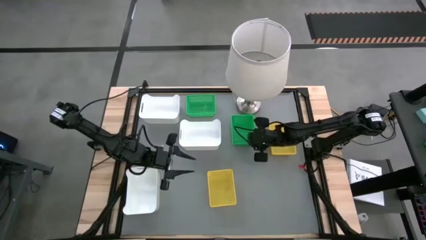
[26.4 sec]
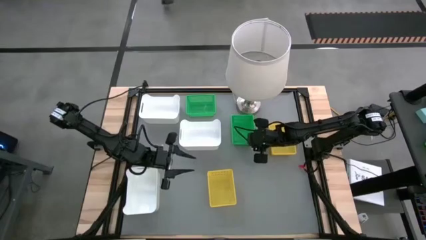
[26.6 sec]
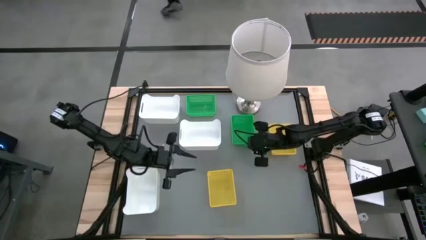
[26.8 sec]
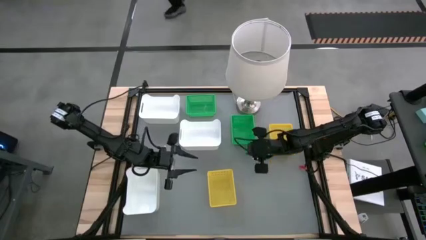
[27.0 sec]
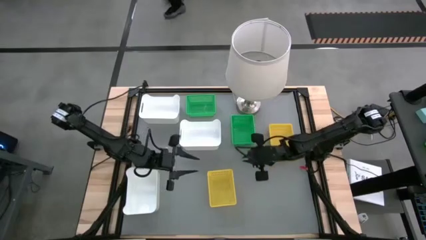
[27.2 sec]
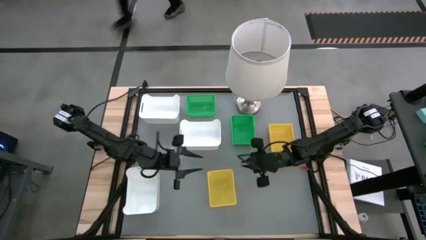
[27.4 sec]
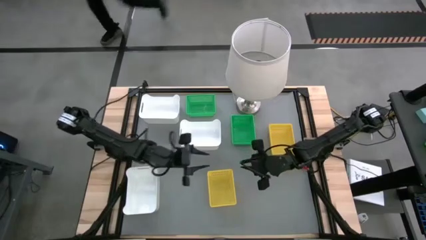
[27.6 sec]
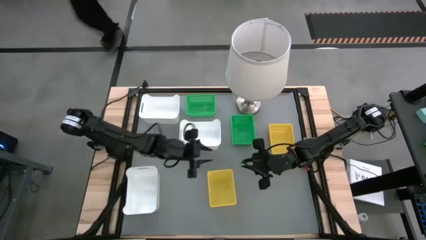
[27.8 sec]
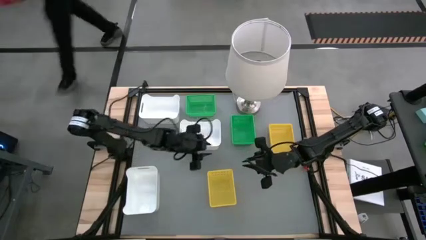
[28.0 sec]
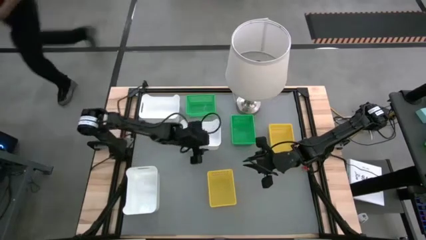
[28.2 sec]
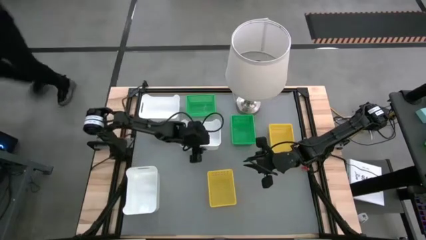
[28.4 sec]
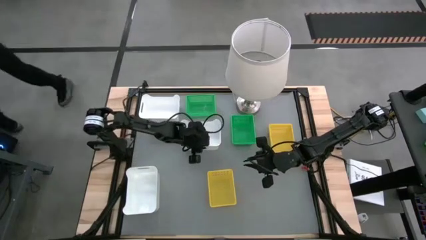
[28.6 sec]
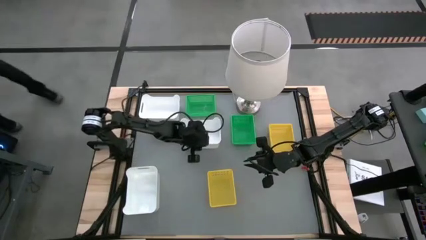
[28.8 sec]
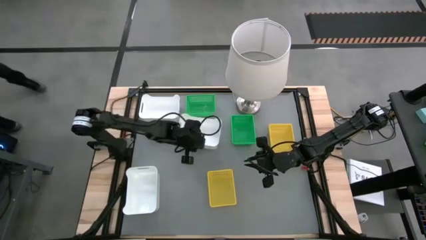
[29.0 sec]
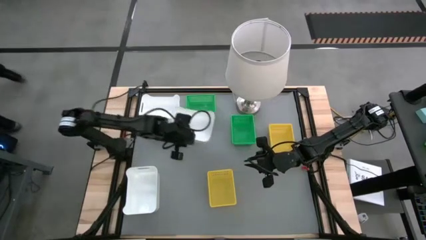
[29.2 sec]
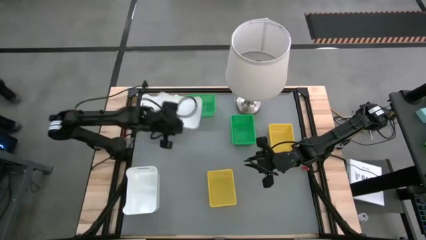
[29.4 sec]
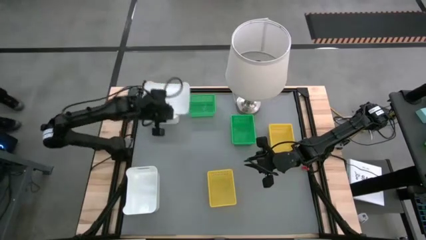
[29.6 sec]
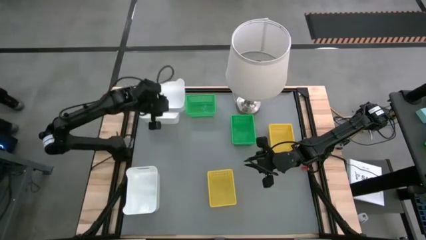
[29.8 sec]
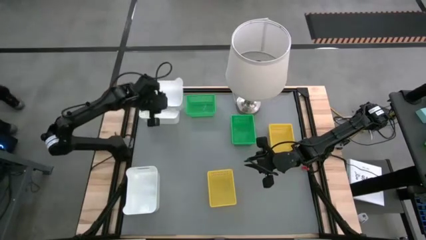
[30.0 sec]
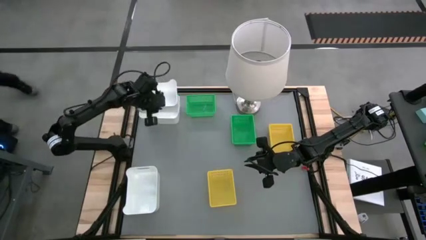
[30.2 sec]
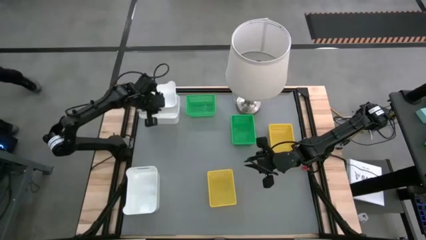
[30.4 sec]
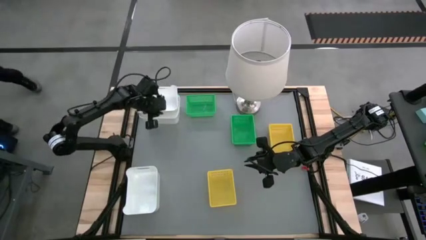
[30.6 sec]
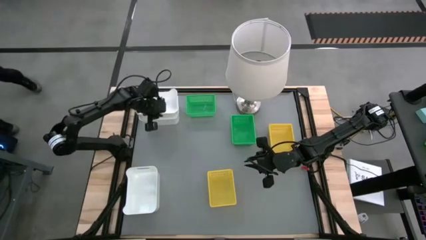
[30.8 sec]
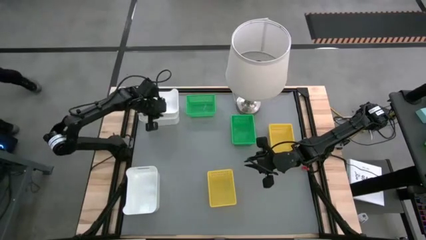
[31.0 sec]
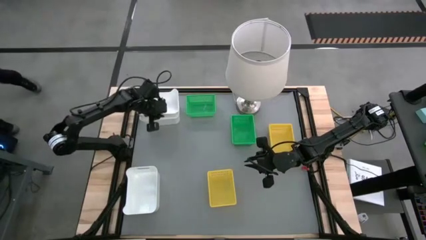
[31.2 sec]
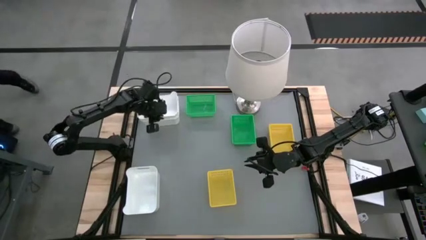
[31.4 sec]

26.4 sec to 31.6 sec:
Stack the middle white bin on the top white bin

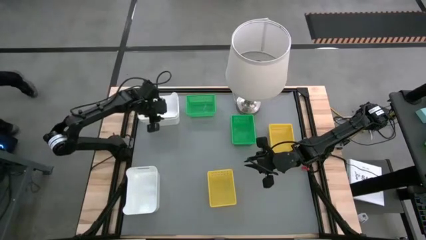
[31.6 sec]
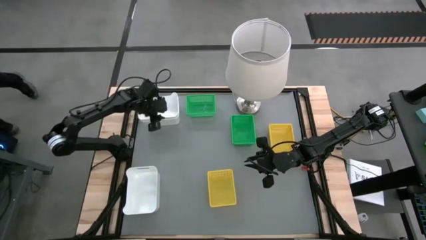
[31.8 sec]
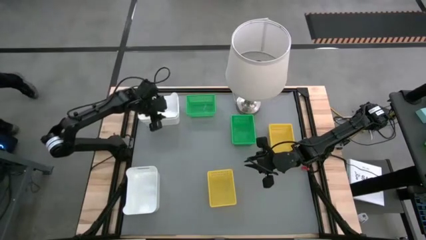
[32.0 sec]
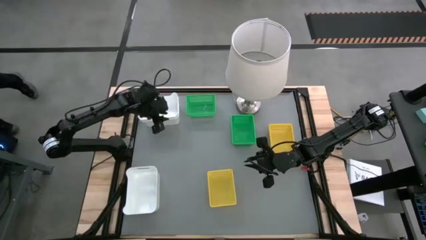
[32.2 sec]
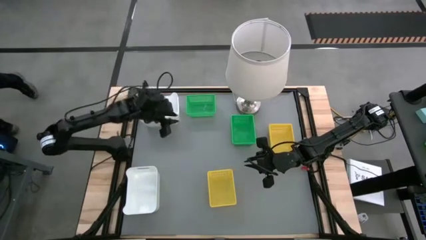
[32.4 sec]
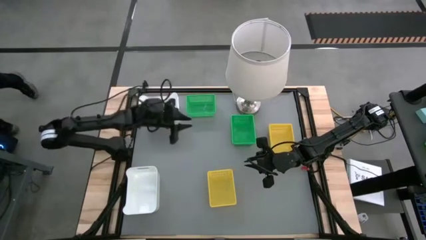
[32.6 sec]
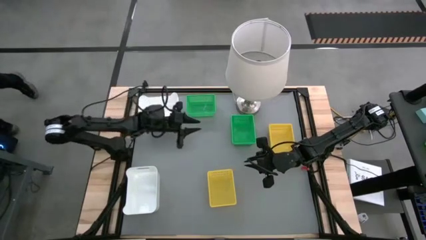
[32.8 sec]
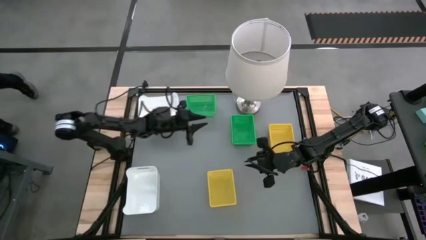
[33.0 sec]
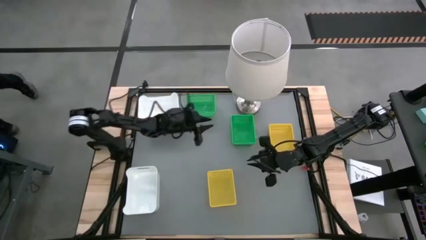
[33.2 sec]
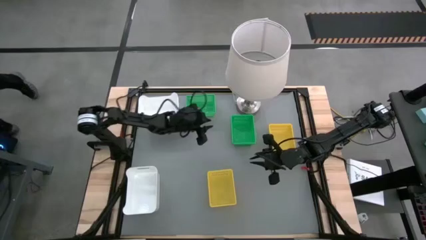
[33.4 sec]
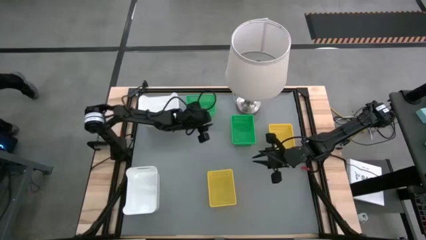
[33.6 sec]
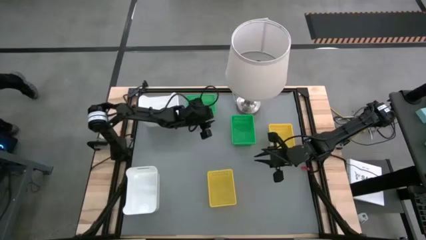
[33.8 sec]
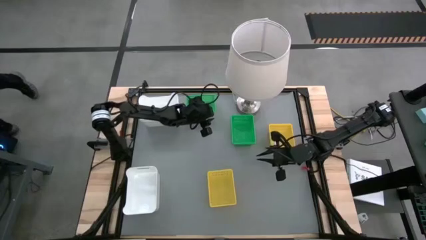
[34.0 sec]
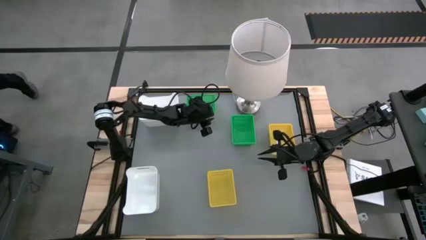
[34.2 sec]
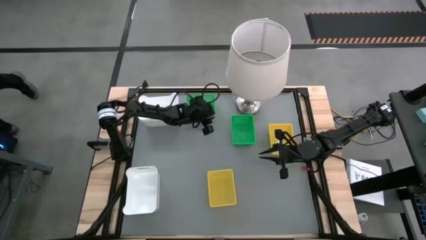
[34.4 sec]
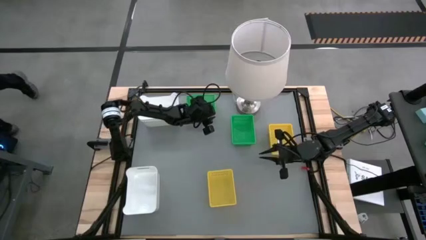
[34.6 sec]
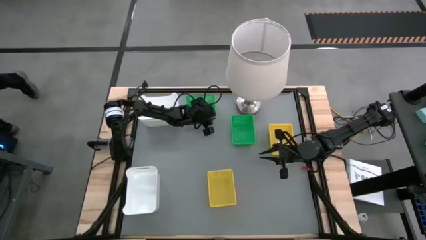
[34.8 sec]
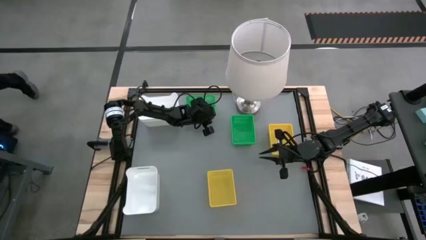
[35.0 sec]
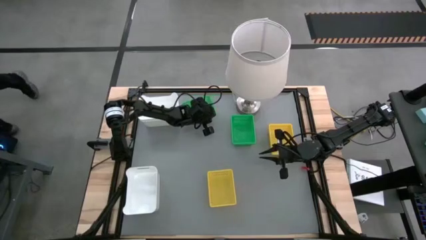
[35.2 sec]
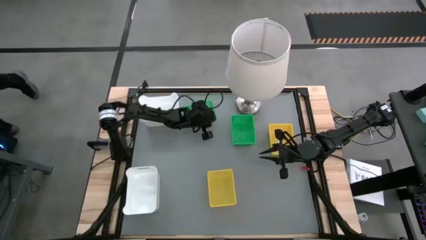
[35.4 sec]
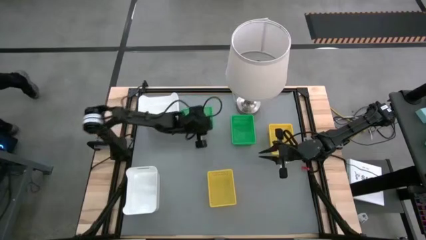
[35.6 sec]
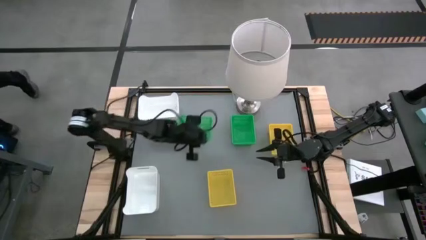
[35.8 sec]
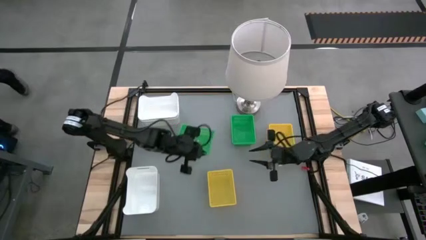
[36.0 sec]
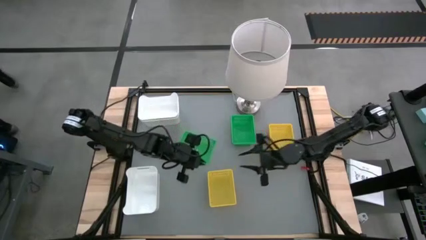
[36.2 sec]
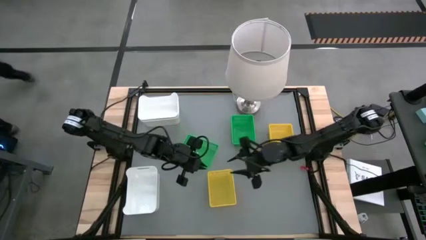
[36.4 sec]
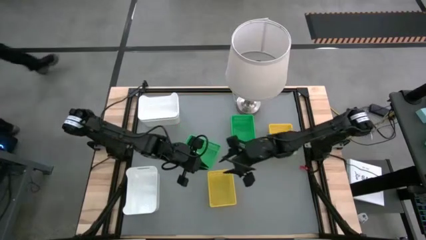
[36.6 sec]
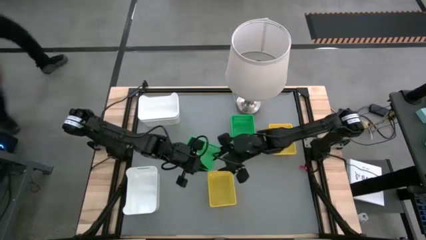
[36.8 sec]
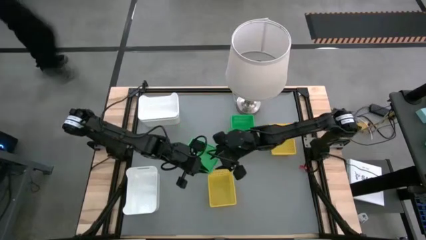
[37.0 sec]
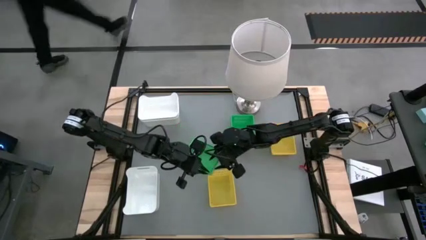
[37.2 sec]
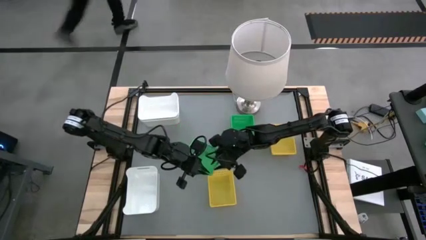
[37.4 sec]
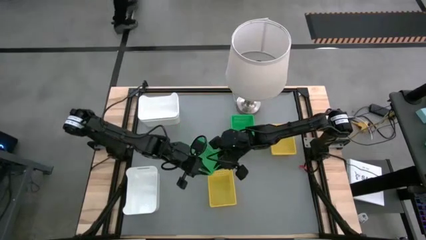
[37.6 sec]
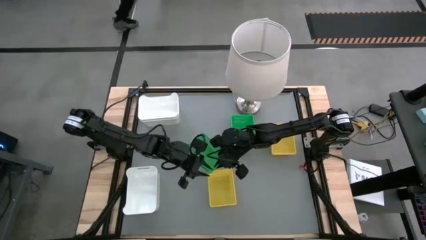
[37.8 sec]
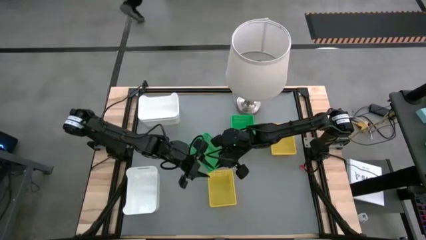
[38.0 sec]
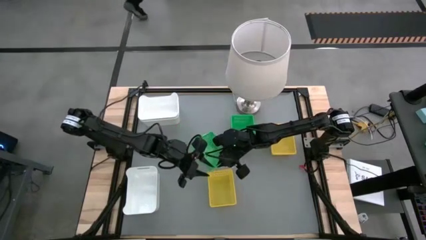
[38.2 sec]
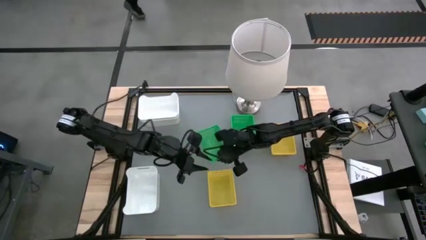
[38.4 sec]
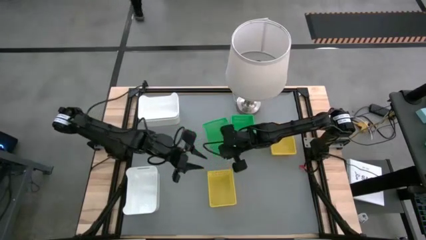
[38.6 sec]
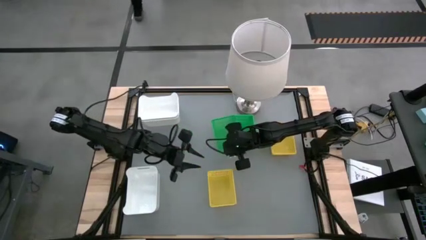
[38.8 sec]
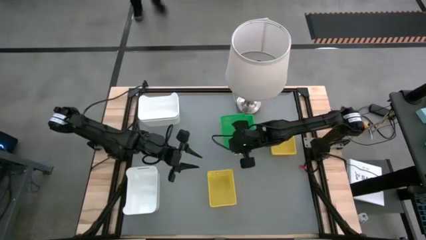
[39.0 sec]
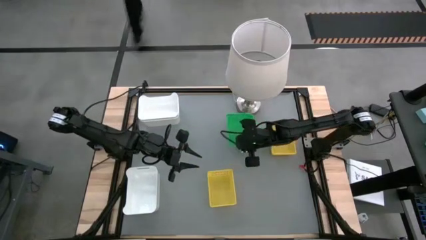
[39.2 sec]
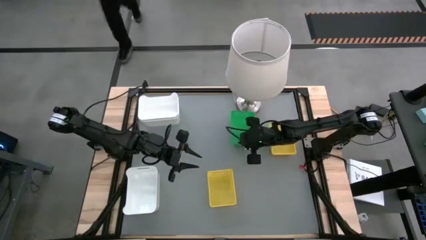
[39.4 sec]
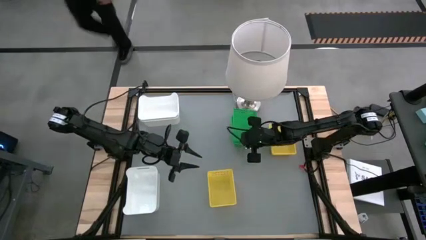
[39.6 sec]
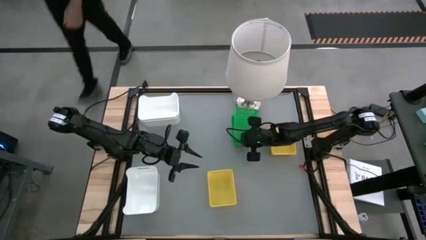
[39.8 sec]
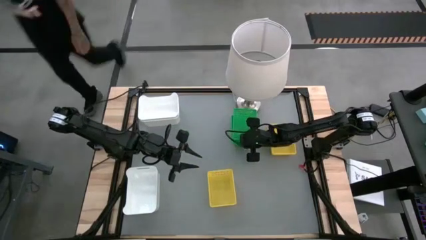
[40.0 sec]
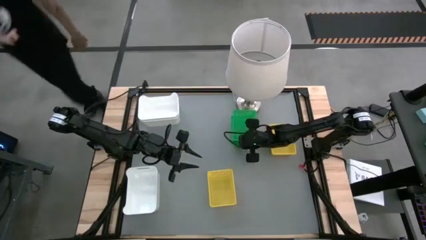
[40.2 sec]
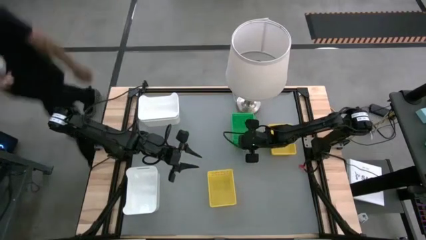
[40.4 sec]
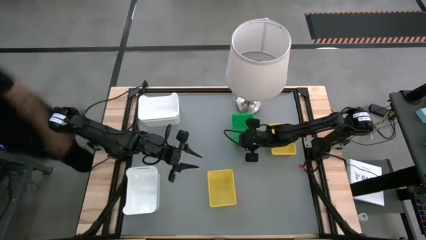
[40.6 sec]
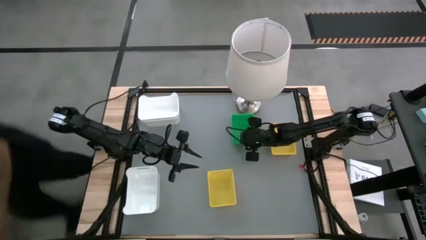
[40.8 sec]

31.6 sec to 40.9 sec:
Stack the top green bin on the green bins
